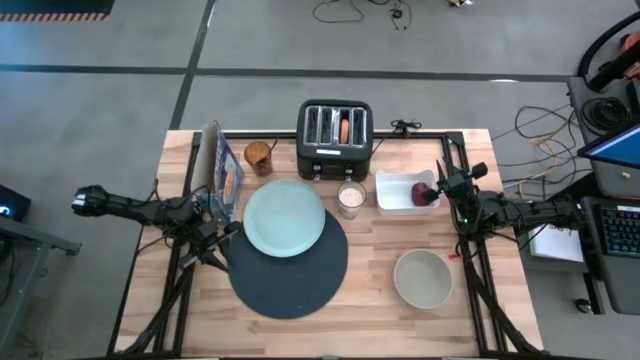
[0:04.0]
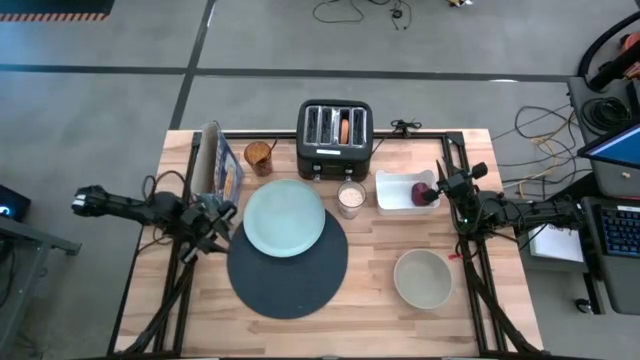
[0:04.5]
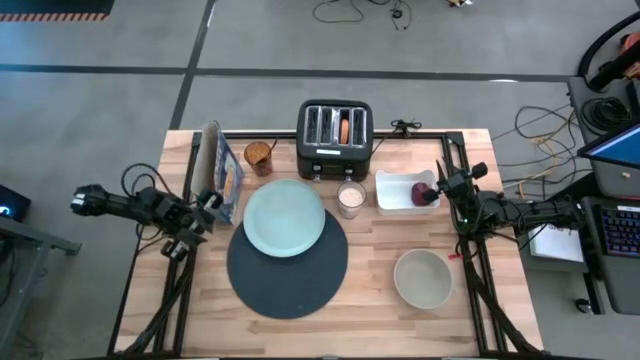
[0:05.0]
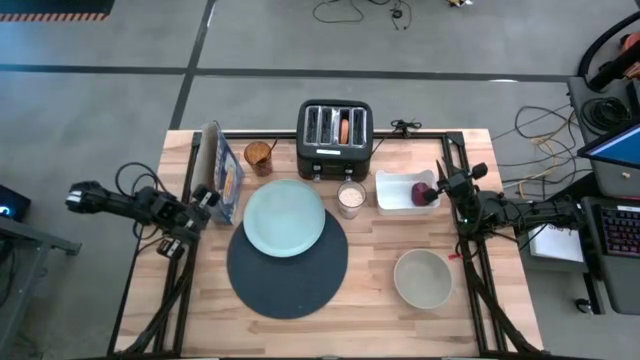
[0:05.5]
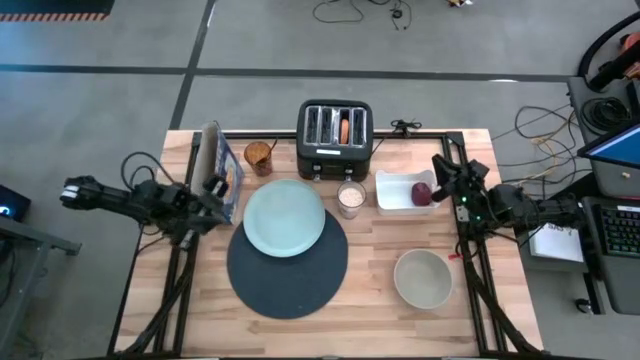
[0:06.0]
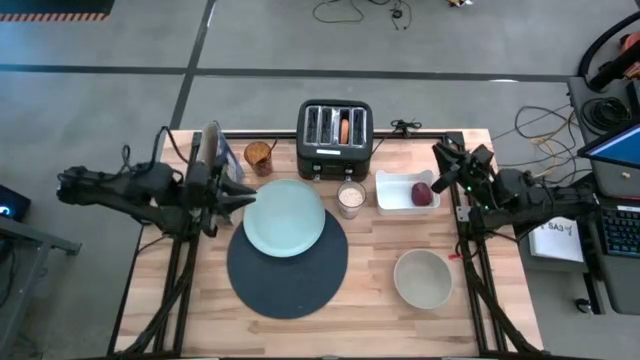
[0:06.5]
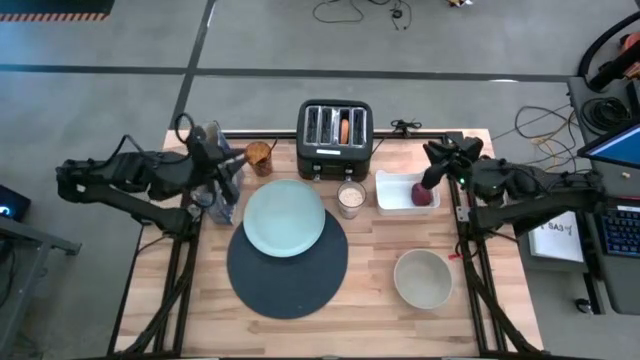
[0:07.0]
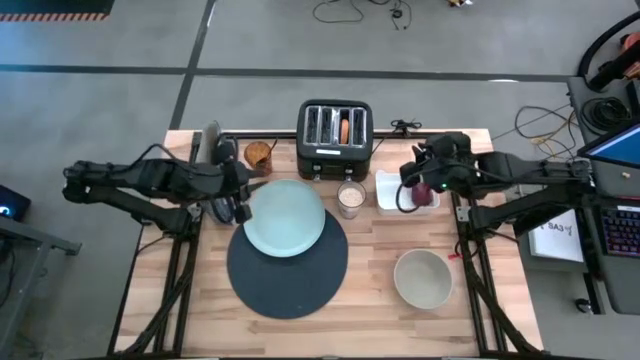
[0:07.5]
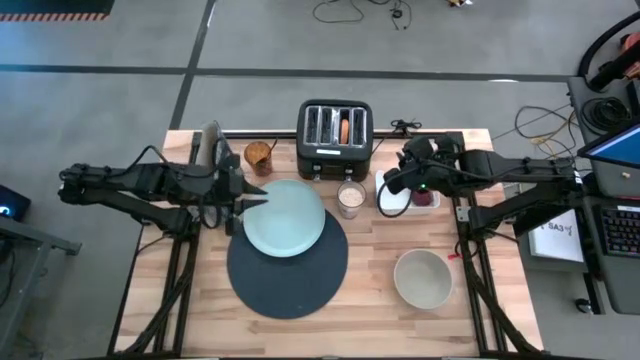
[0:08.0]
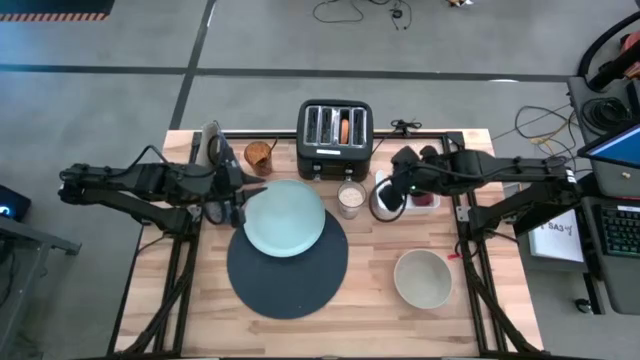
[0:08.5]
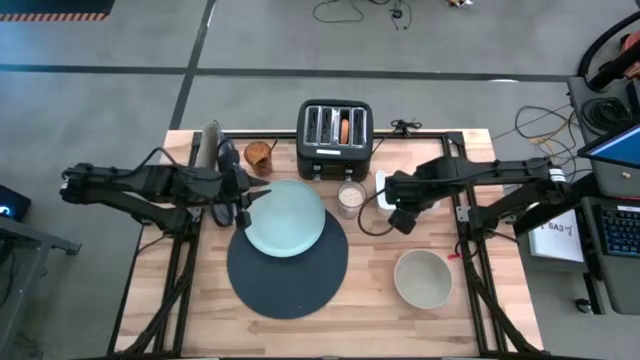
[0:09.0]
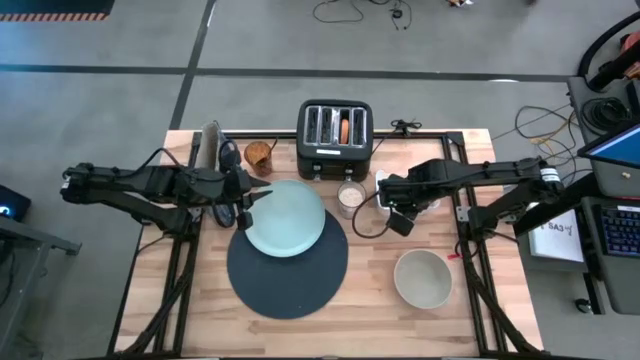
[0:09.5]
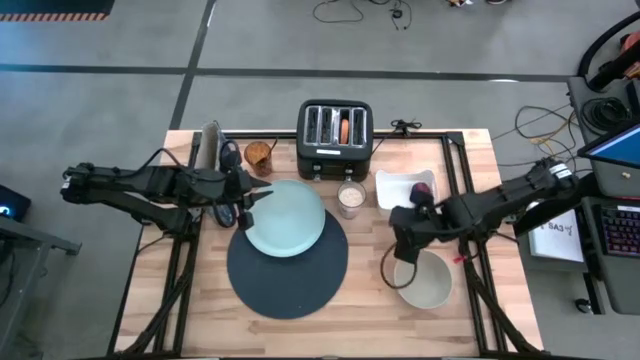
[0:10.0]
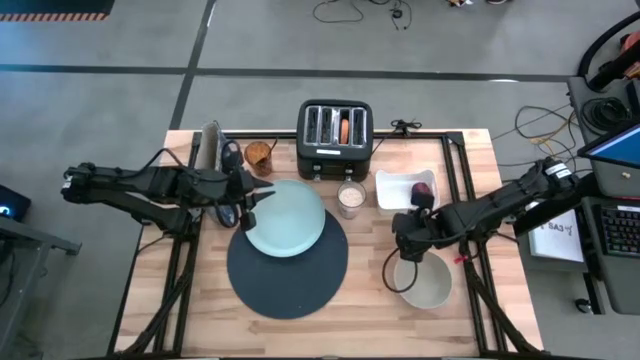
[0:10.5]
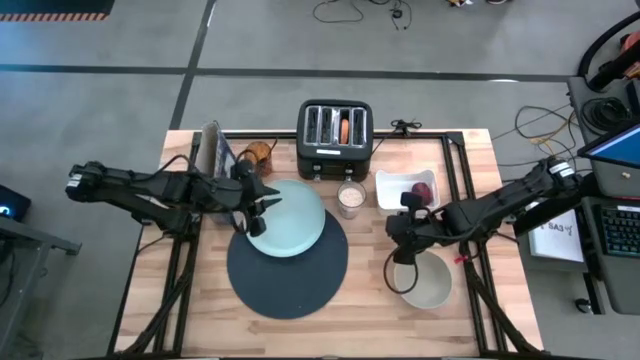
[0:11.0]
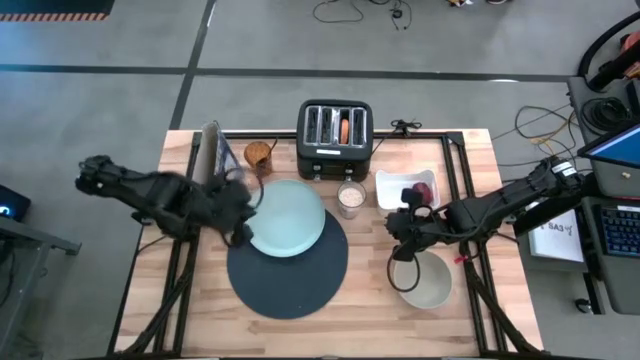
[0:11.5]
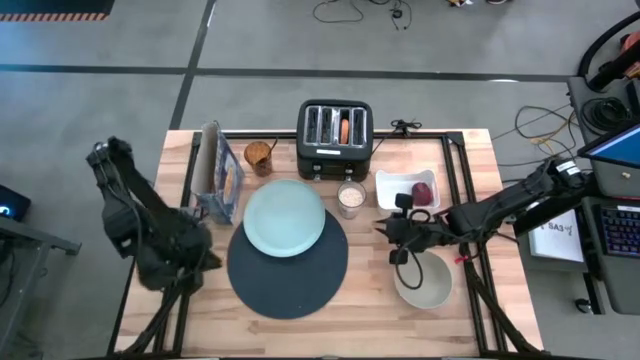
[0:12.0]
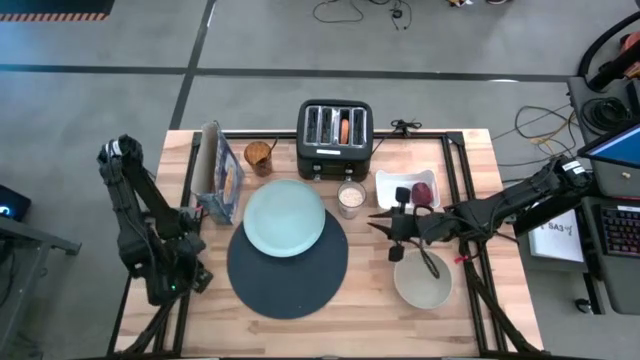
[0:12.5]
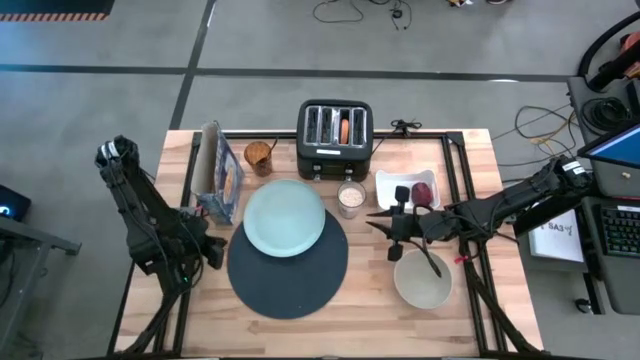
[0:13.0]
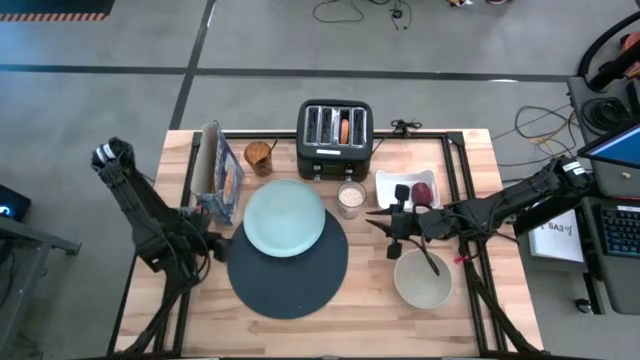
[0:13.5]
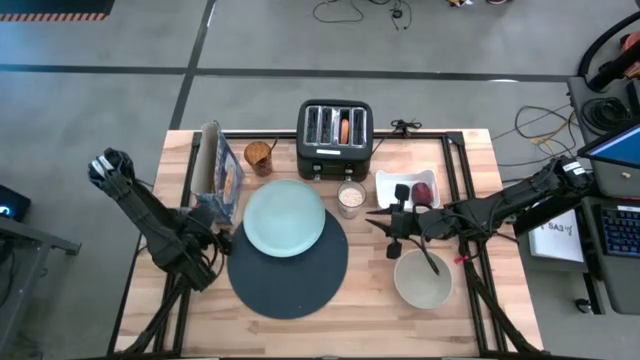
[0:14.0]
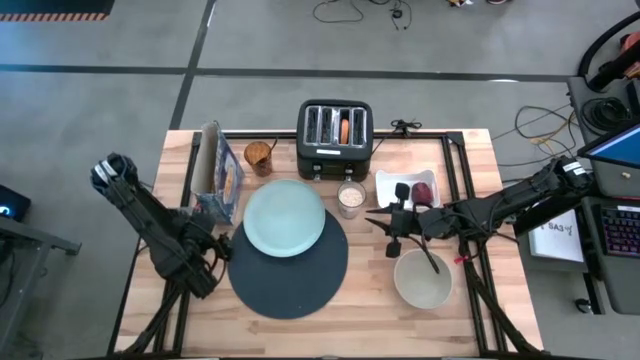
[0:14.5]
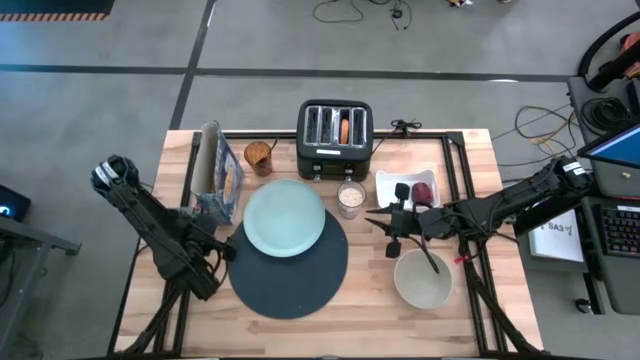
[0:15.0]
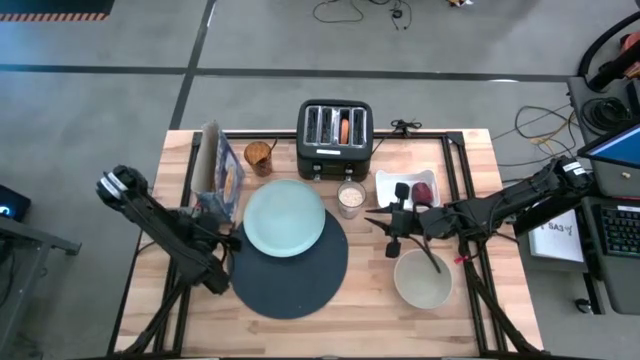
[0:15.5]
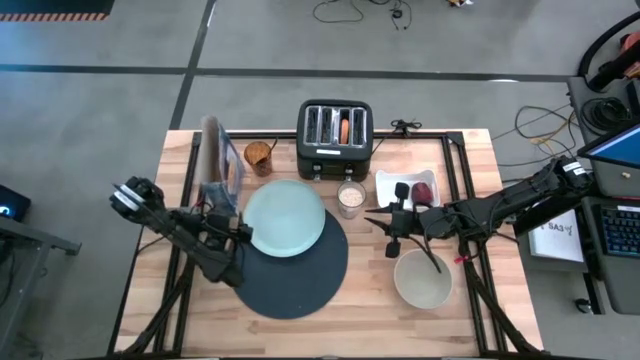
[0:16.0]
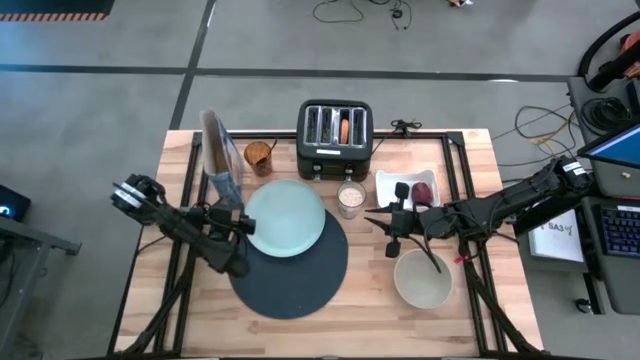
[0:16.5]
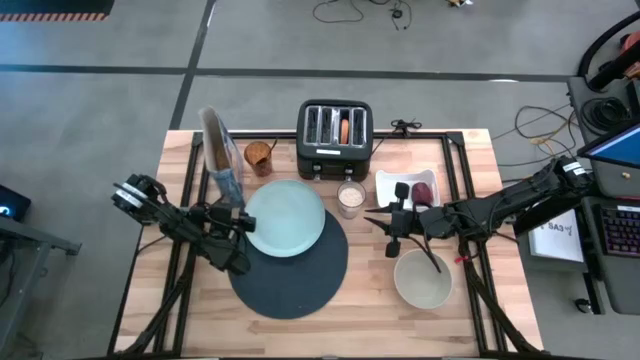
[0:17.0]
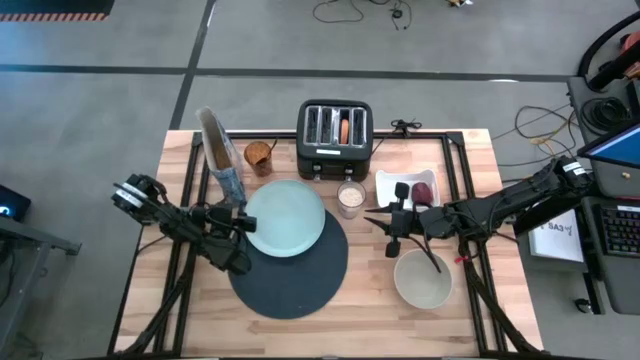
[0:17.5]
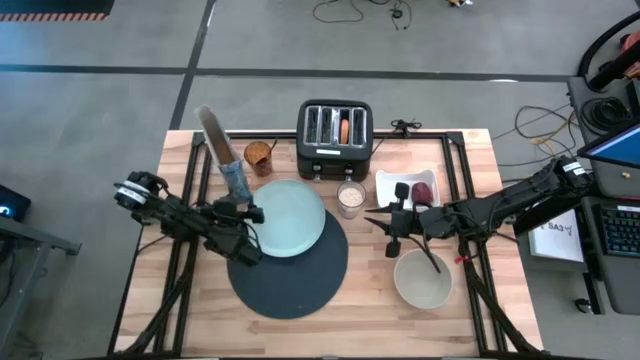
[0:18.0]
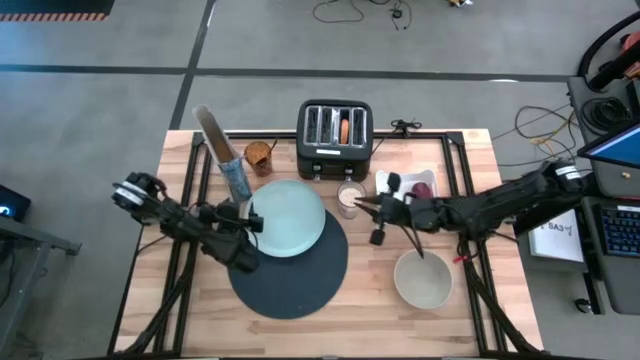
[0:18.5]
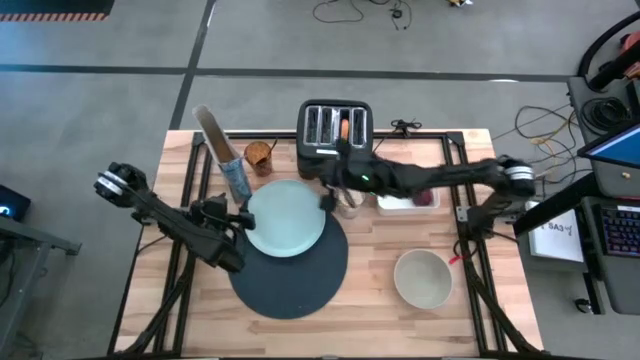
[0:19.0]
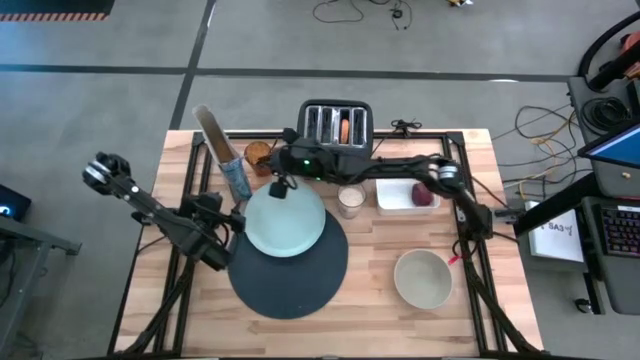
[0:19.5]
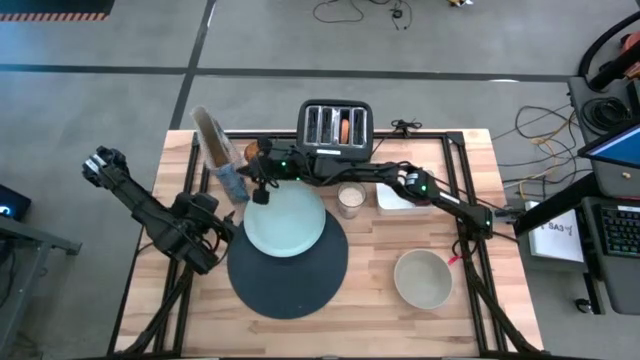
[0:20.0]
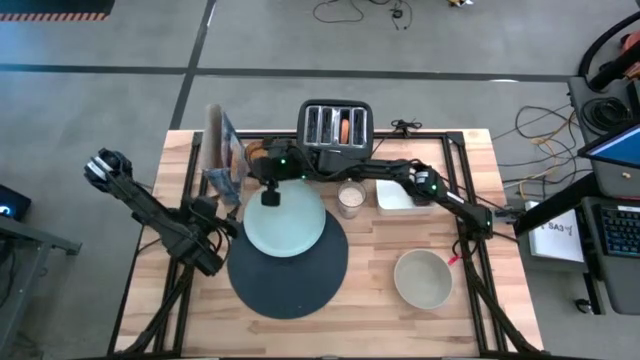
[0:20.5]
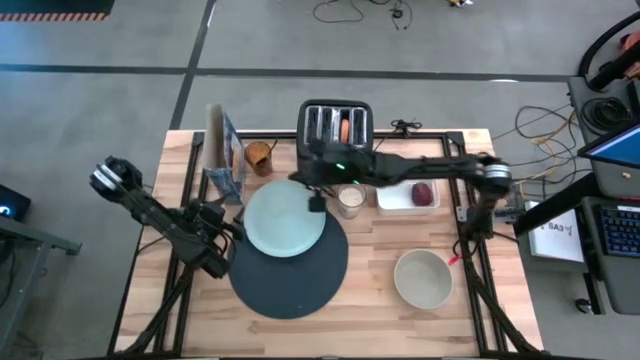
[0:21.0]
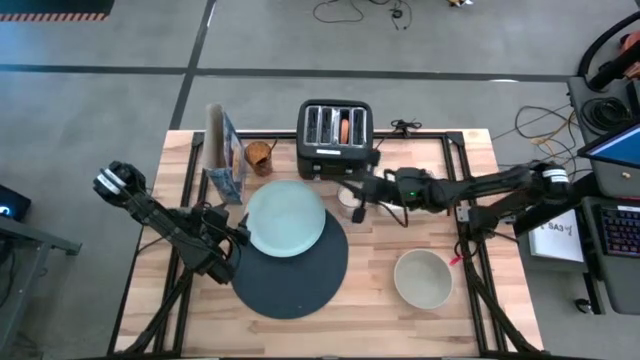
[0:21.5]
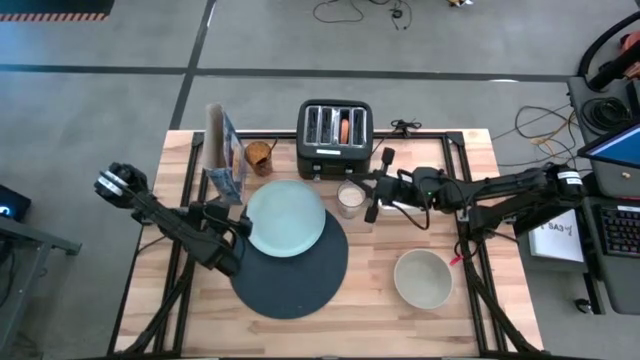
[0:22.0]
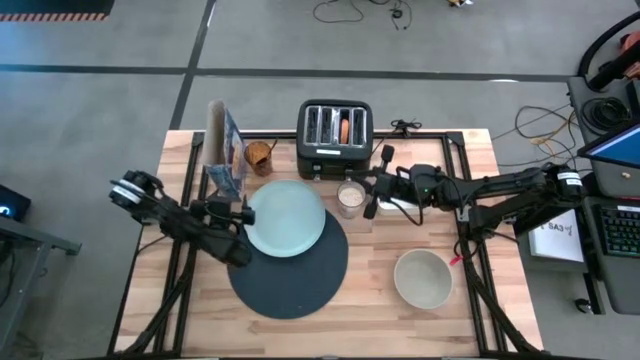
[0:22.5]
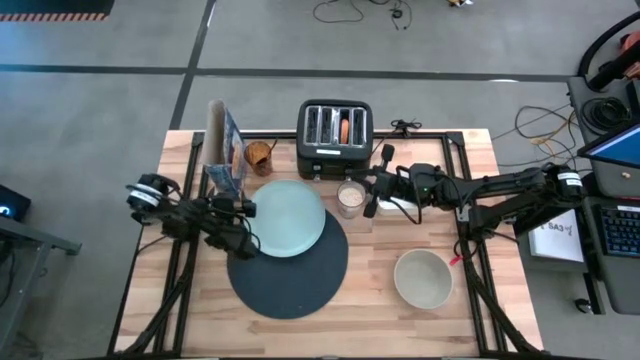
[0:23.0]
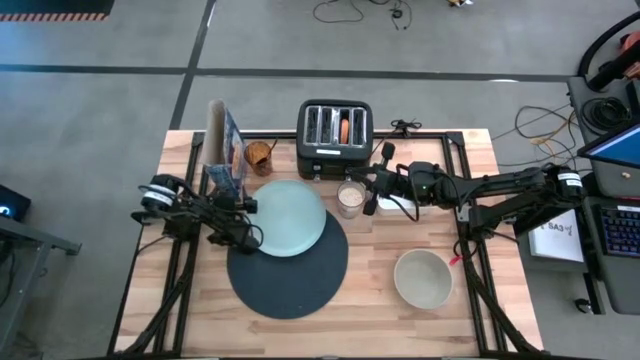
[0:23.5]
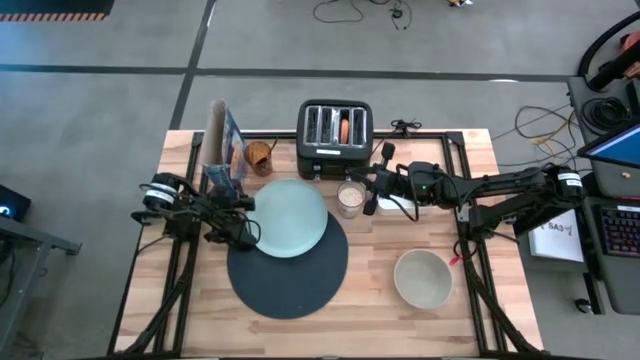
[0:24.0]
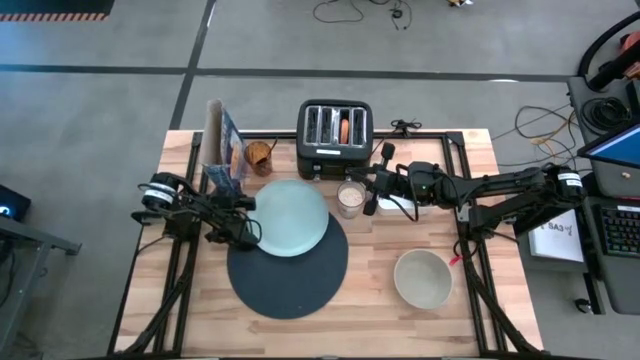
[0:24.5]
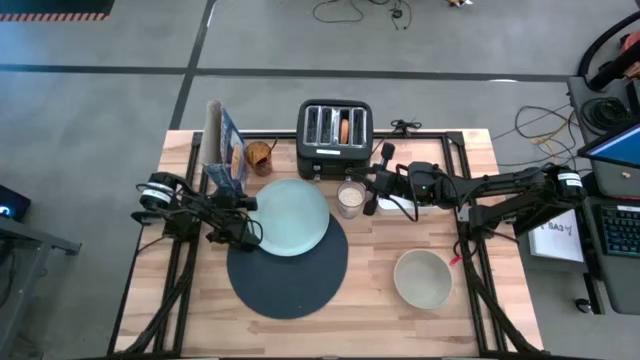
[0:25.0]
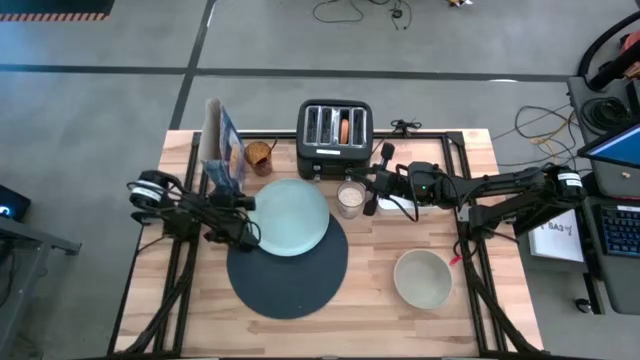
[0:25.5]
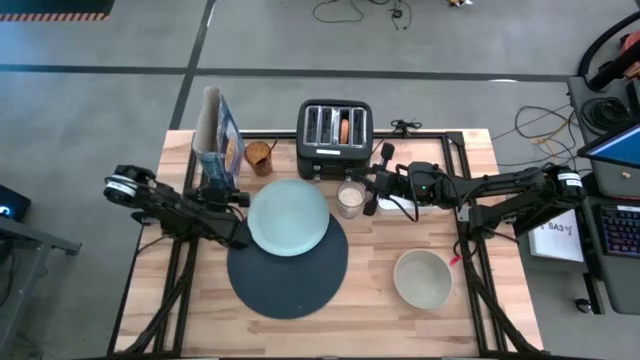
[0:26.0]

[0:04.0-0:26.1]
Task: Arrange a breakfast setting
Pour the cereal from the blue cereal box into the gray bowl
